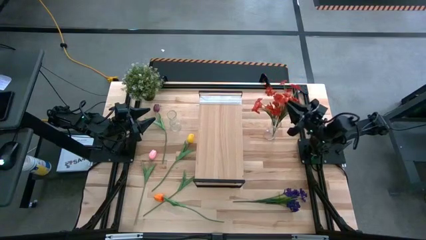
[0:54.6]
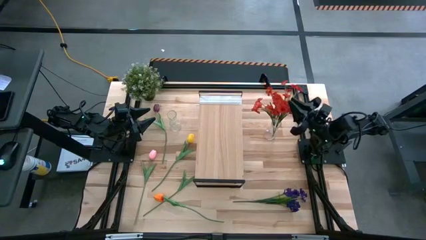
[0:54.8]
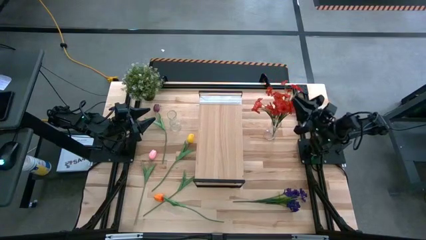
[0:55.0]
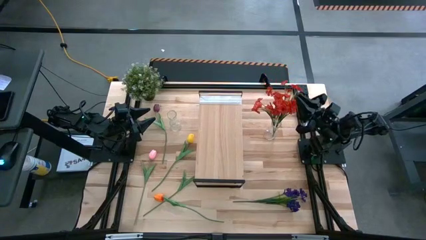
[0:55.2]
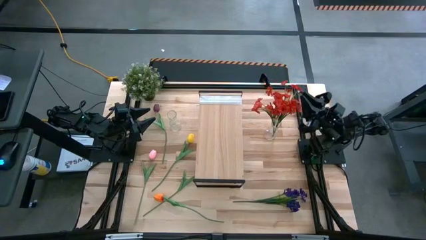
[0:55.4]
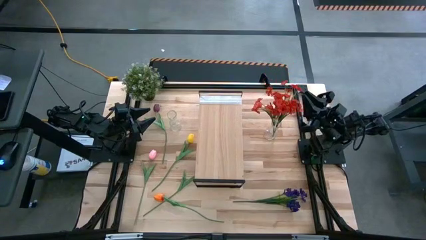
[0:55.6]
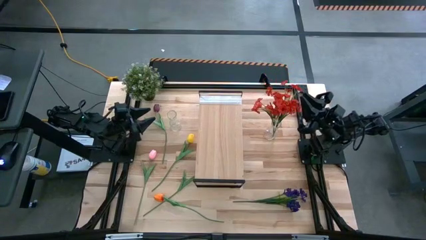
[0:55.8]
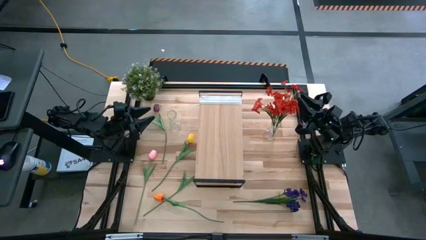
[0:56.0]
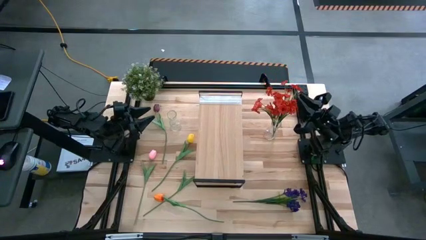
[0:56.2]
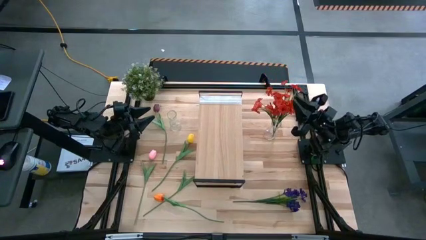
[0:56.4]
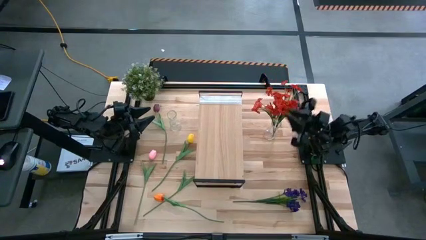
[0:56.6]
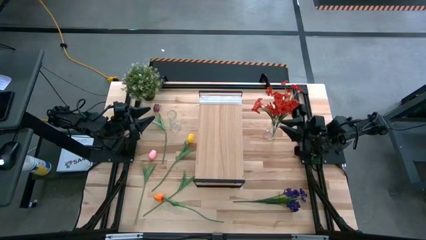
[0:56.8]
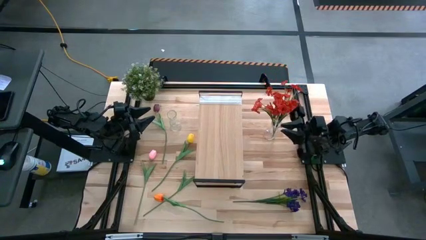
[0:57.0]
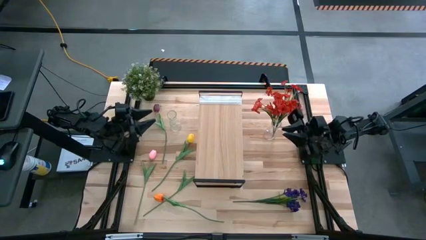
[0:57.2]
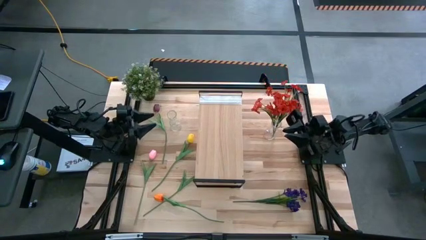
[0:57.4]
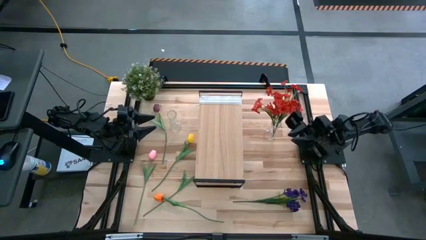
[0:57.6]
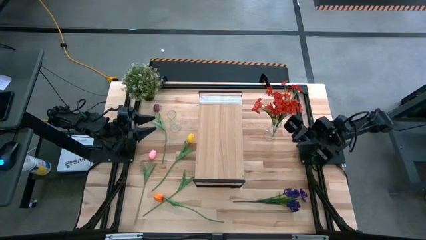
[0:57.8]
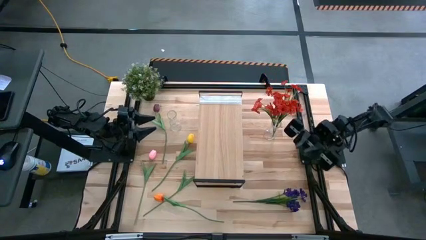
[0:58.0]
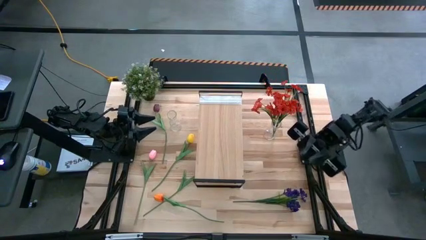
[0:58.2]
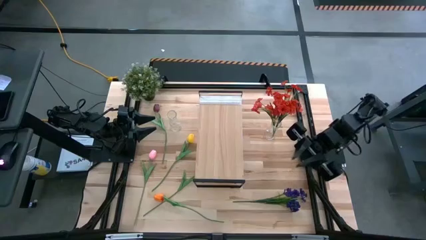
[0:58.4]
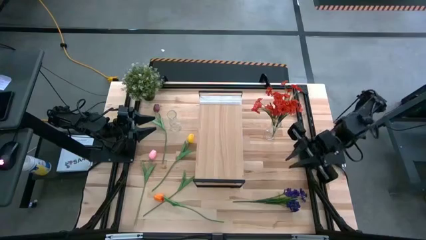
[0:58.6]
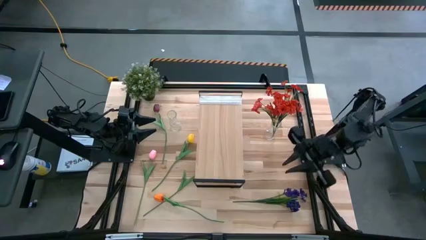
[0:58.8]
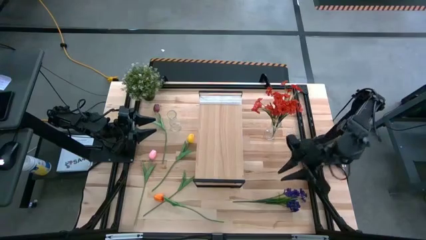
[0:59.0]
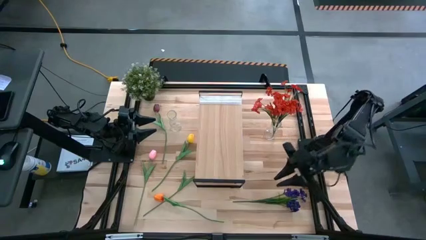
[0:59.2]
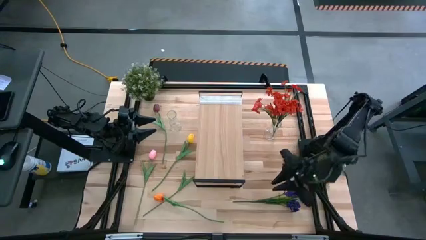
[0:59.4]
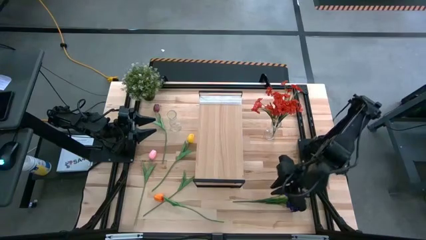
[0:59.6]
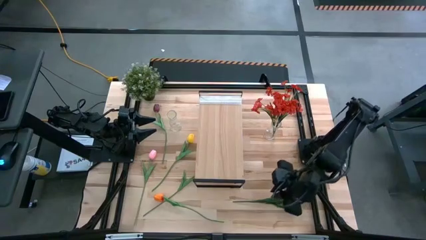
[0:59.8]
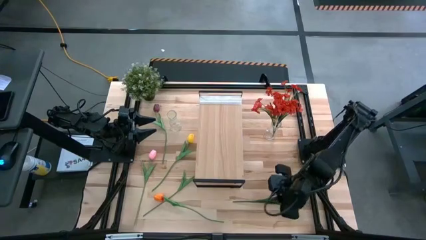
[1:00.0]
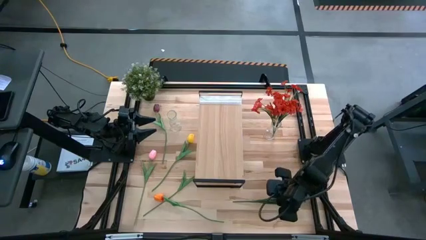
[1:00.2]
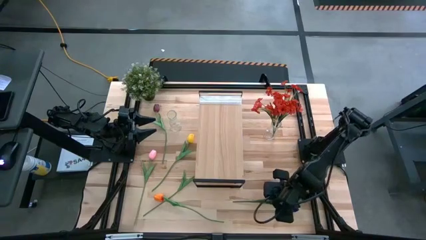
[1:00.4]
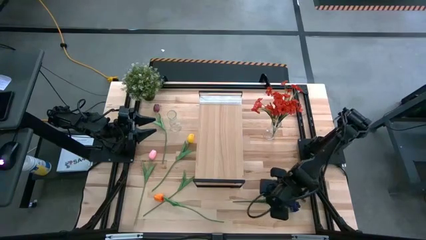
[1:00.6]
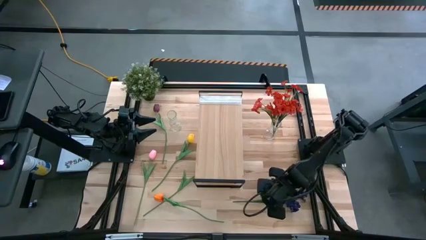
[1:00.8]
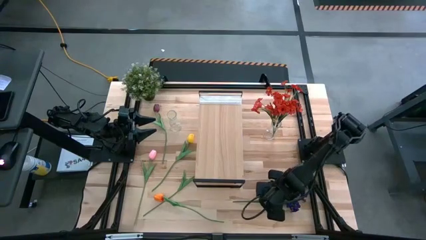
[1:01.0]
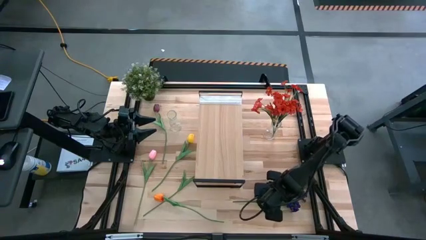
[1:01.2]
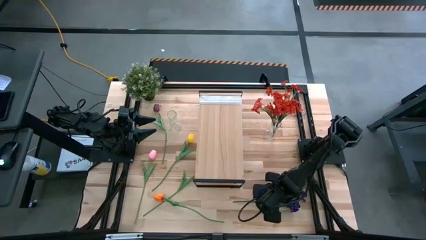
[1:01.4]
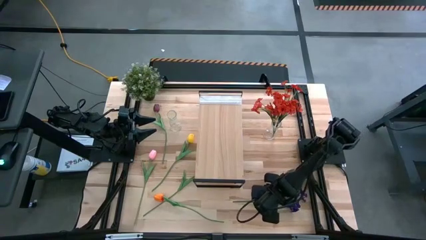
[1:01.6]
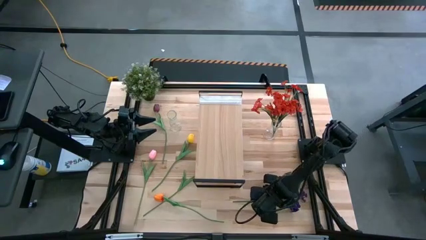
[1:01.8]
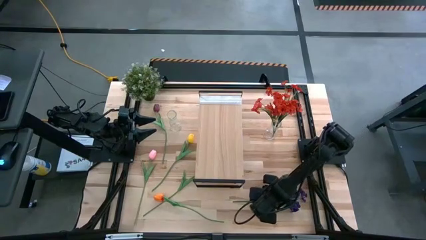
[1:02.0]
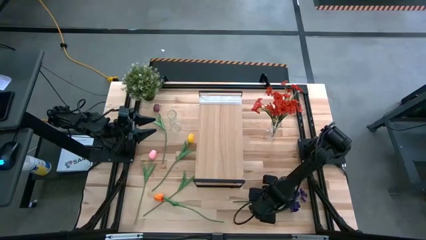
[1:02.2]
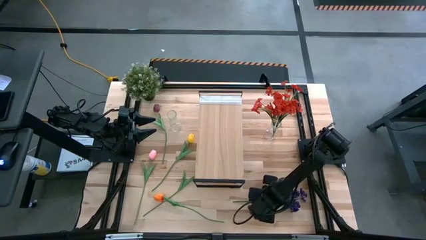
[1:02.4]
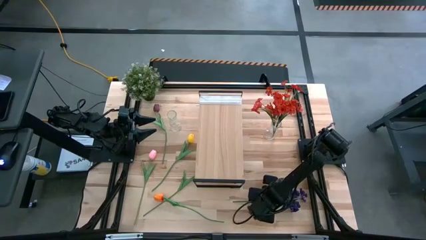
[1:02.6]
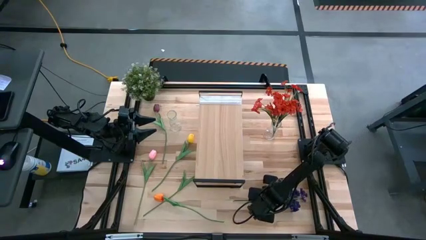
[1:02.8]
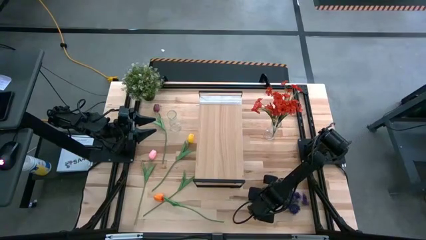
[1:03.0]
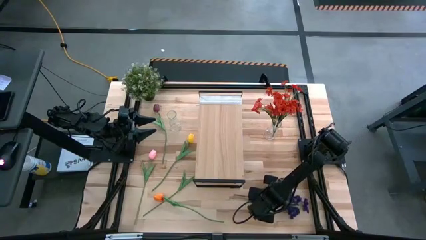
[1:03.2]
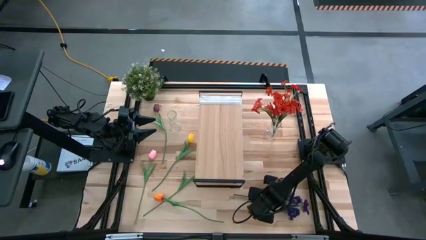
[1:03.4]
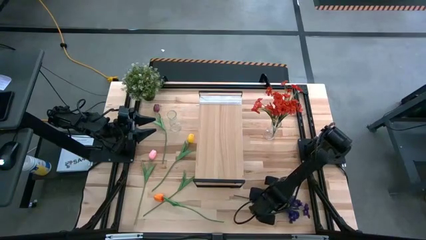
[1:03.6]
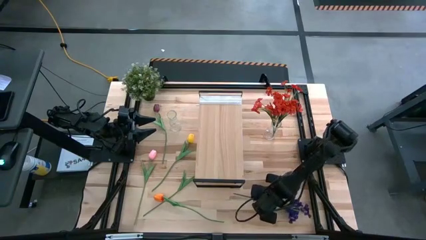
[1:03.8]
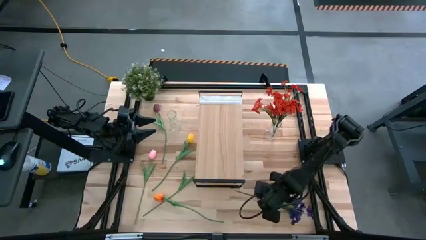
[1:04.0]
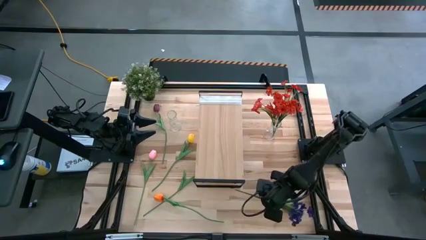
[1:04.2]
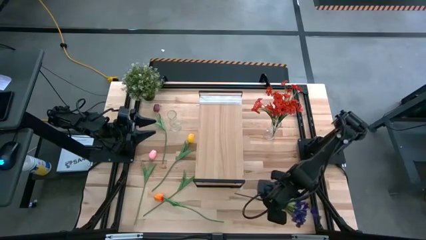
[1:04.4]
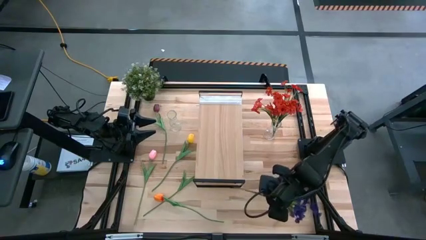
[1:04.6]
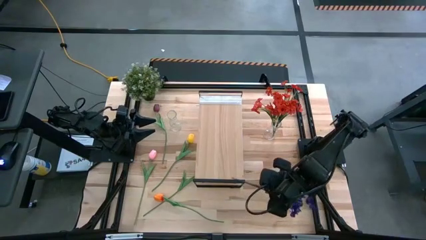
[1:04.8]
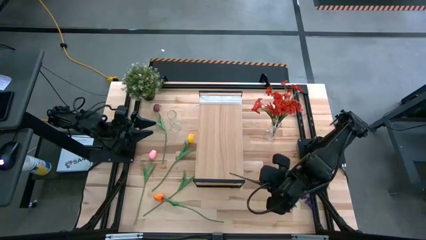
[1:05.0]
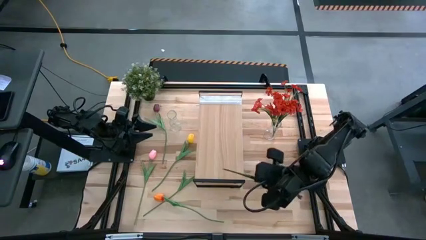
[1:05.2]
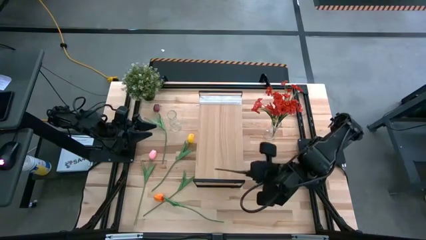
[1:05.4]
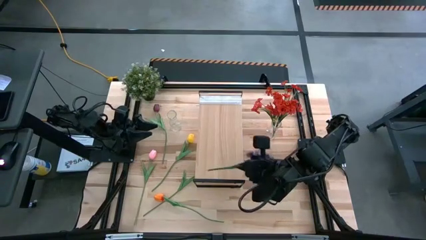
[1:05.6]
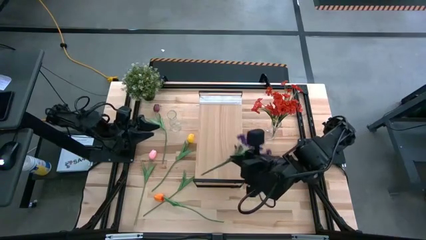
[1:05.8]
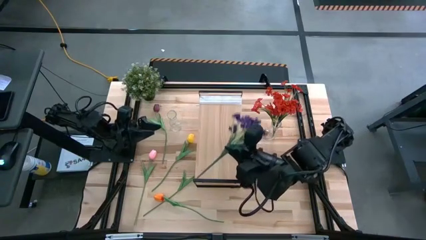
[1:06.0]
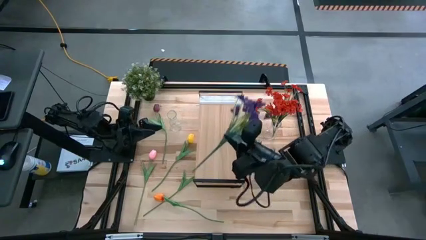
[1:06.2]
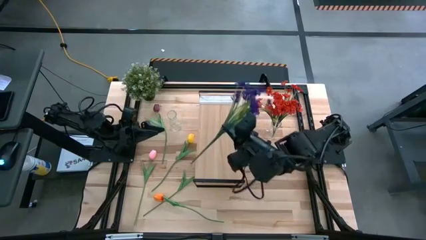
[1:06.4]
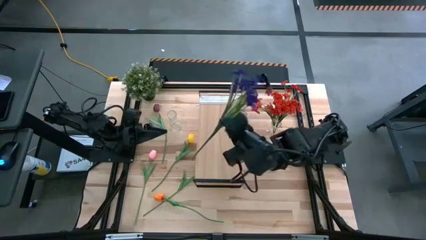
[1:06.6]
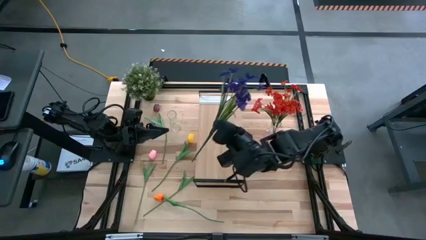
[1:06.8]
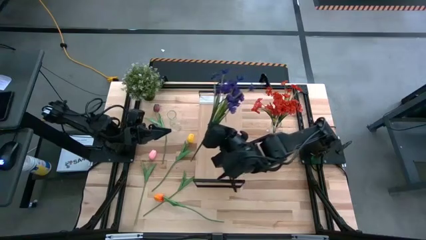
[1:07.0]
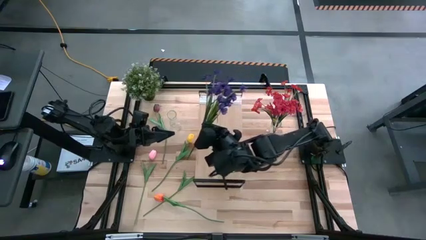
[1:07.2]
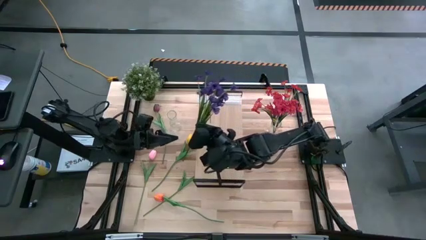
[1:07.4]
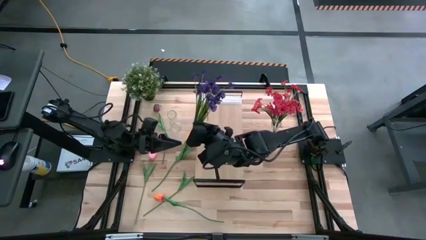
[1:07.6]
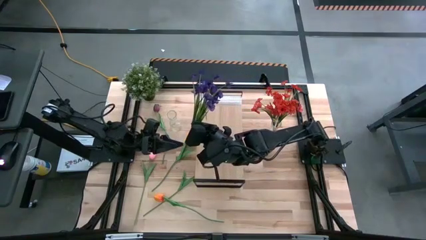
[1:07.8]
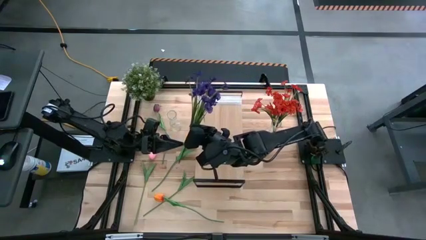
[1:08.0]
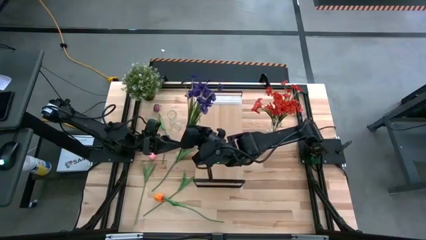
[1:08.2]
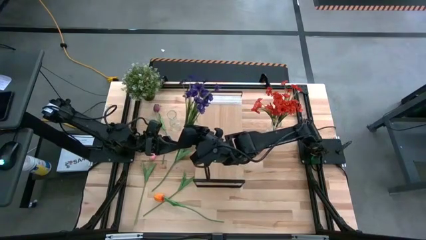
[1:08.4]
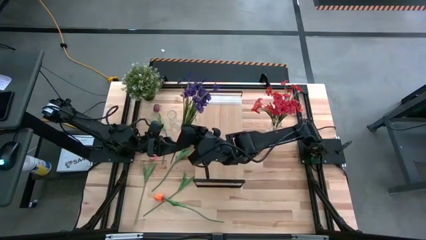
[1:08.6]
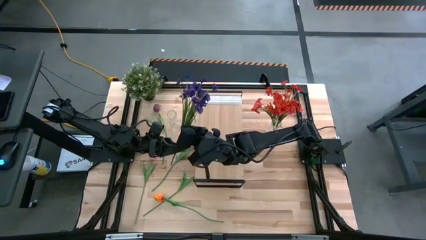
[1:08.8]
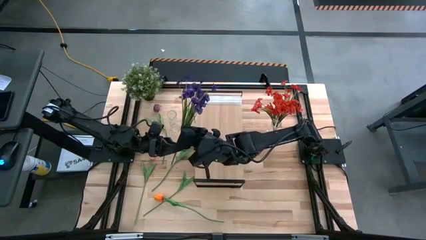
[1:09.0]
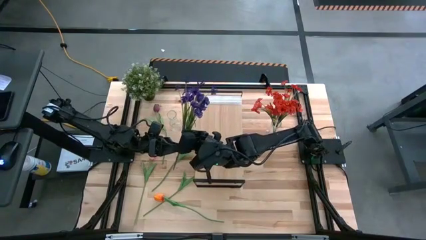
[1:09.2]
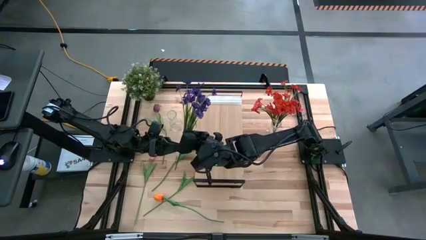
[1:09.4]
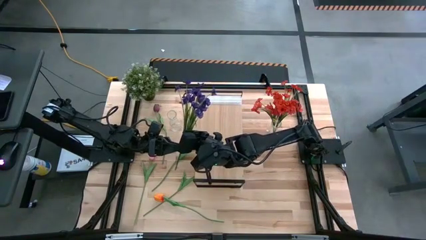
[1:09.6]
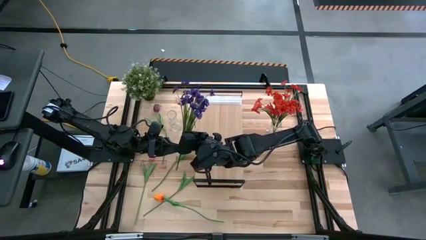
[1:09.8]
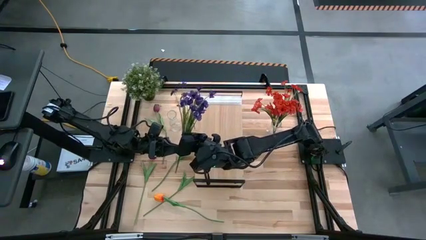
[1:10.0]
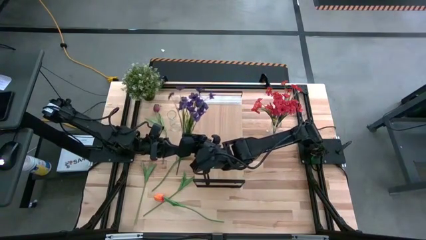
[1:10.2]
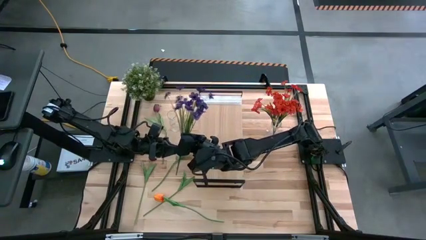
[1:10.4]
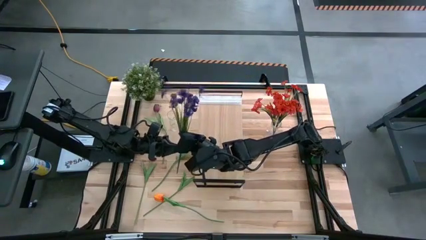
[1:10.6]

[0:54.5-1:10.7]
Task: Pick and place flowers into a vace then onto a shelf
Put the violet flowers into the right transparent vase
